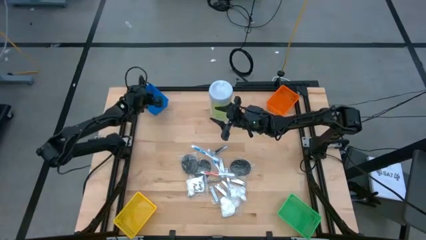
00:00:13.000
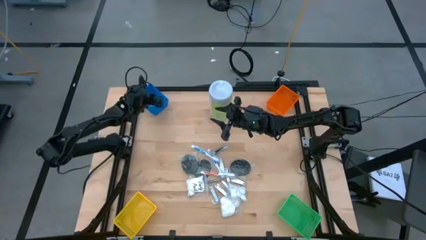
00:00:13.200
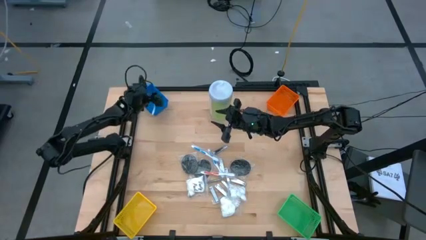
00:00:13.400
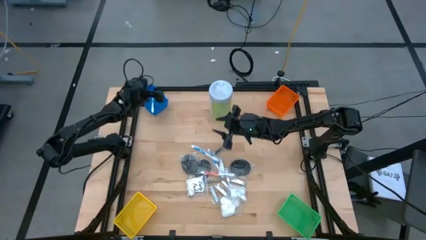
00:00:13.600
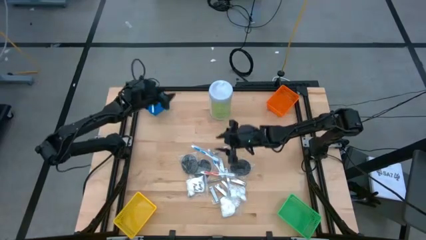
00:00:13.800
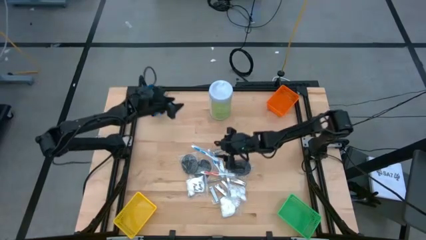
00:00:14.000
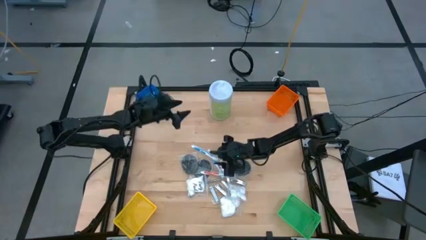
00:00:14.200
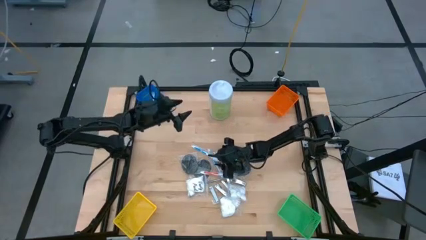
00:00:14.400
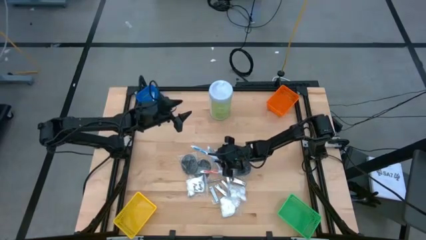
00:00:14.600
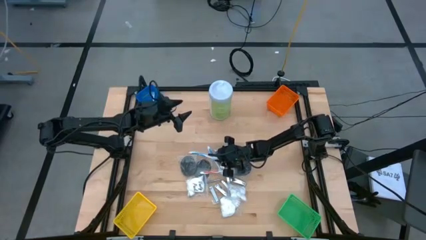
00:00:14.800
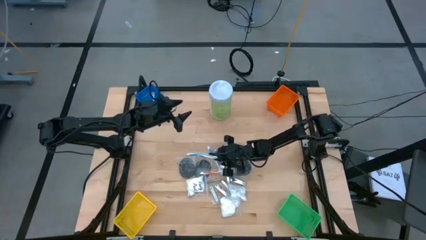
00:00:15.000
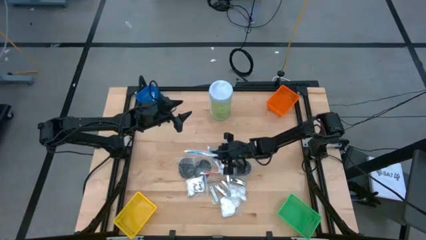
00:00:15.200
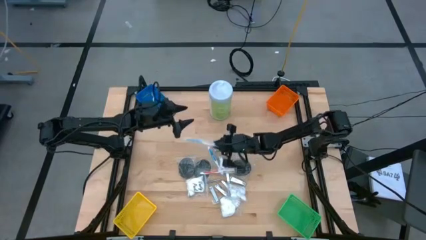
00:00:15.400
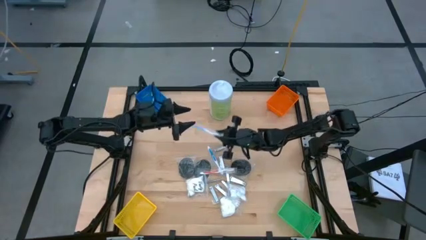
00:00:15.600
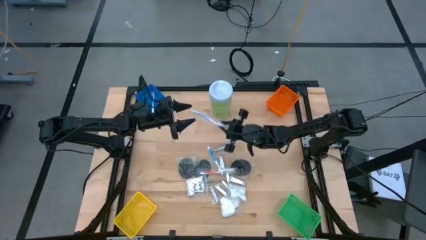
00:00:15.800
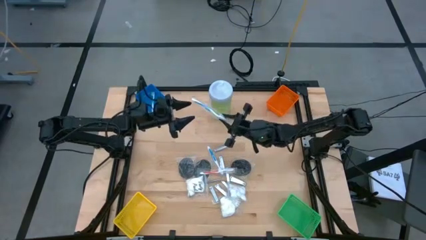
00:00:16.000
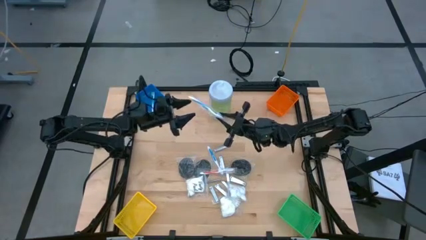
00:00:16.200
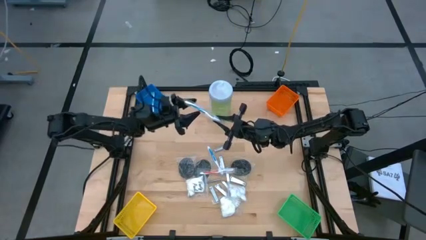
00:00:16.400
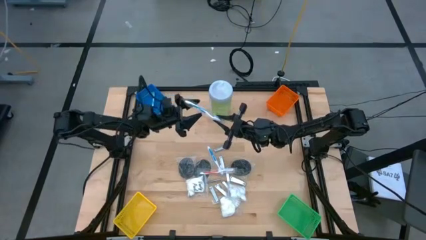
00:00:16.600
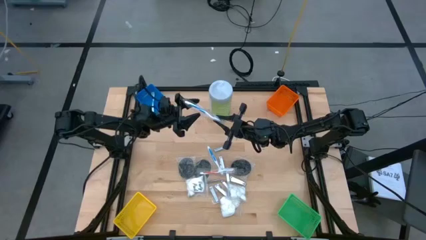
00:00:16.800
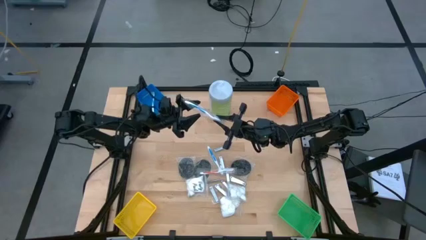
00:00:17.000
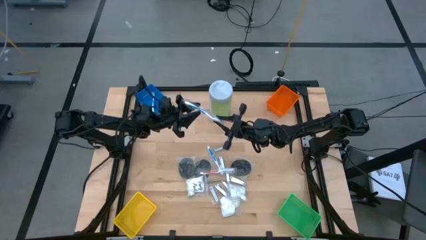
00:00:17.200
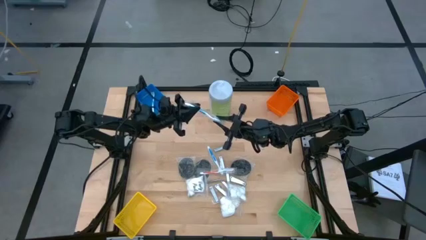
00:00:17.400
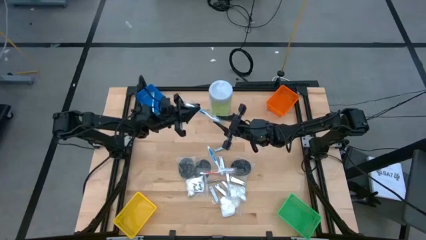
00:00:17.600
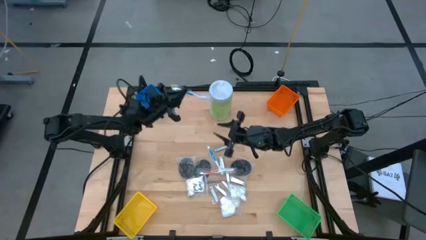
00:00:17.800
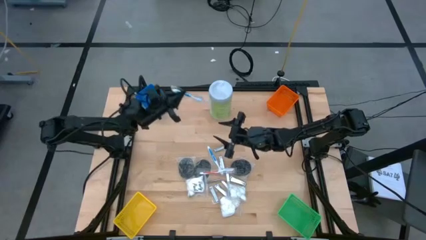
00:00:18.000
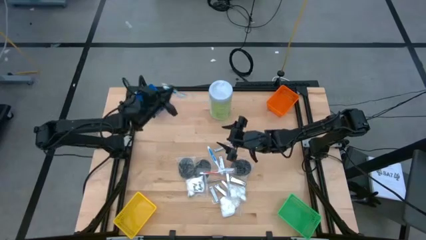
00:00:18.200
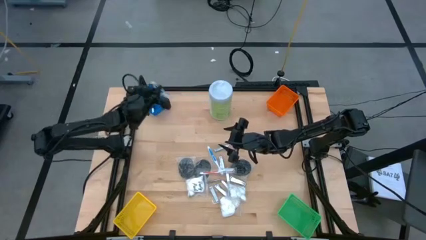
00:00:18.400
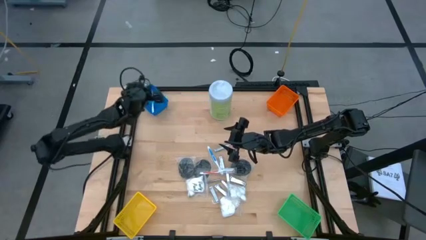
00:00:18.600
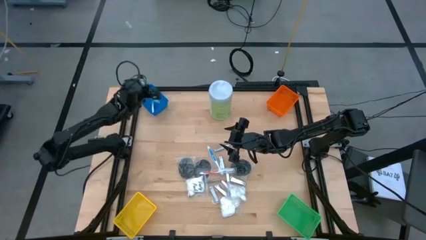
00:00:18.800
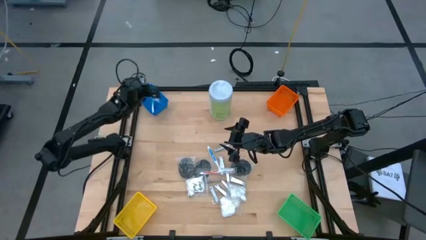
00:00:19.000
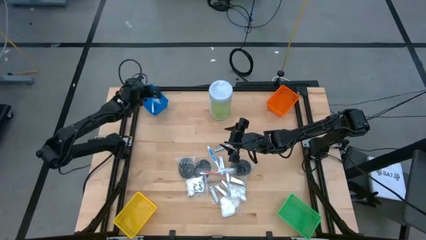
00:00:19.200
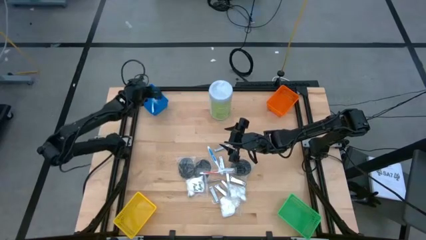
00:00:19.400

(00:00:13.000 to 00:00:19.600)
Task: Pick & Place Travel size toiletries
Put the blue toothbrush into the blue bin

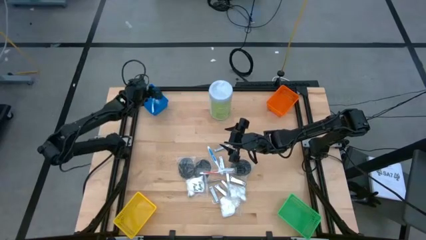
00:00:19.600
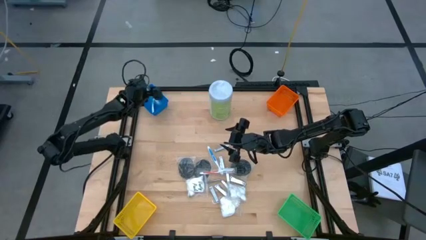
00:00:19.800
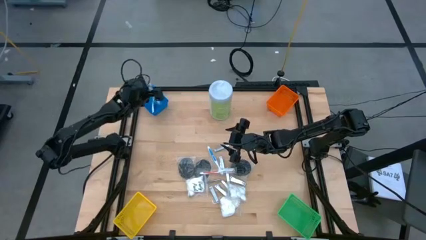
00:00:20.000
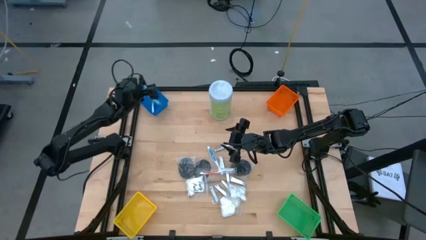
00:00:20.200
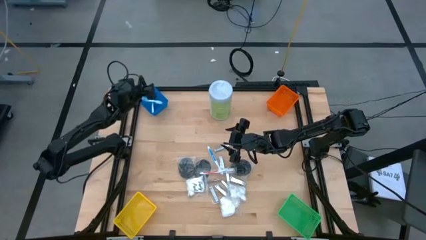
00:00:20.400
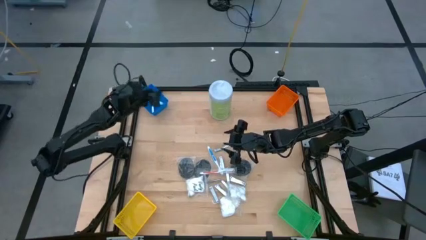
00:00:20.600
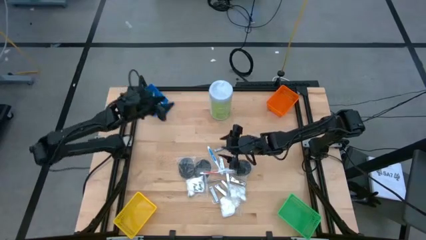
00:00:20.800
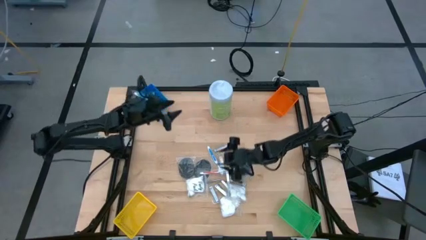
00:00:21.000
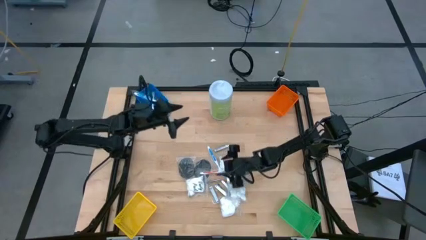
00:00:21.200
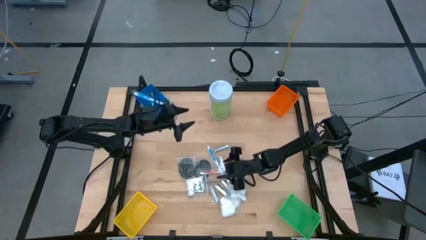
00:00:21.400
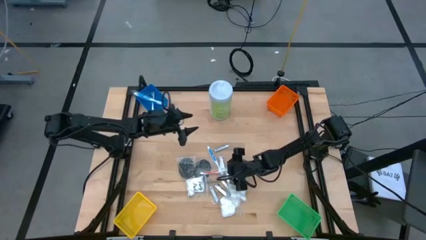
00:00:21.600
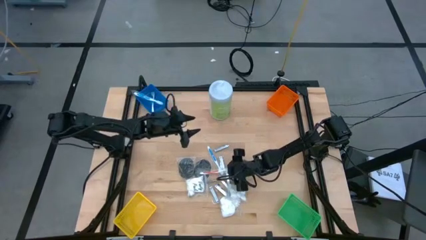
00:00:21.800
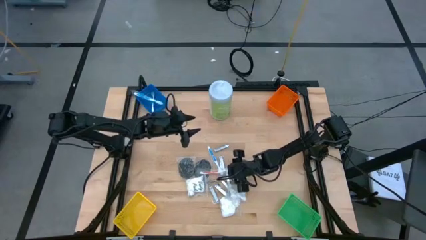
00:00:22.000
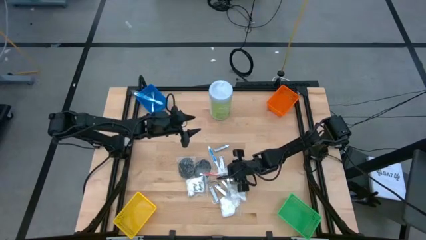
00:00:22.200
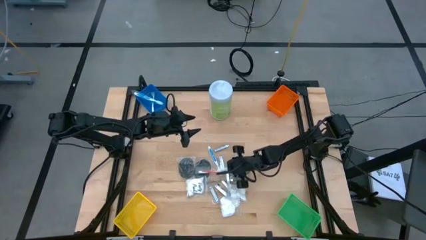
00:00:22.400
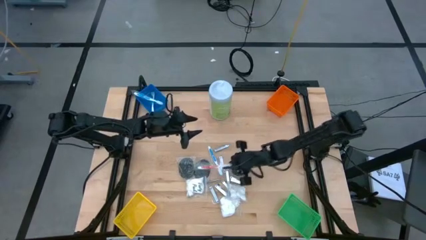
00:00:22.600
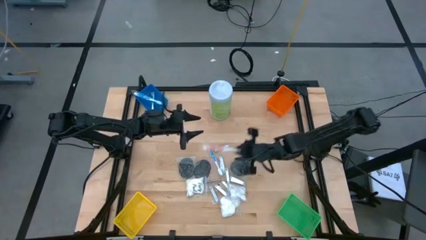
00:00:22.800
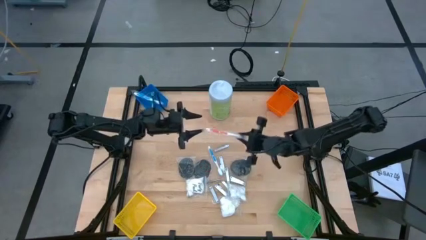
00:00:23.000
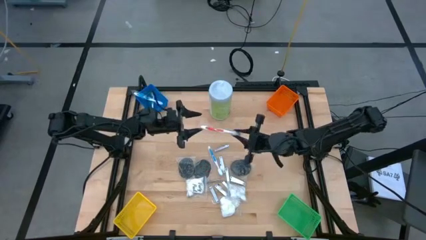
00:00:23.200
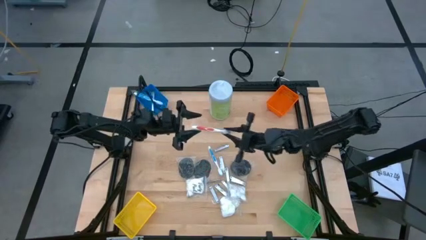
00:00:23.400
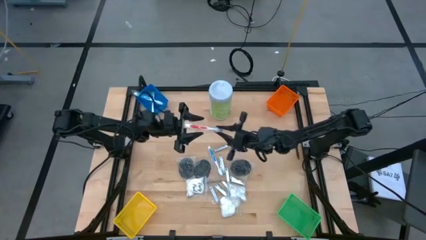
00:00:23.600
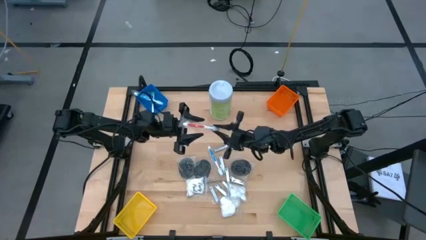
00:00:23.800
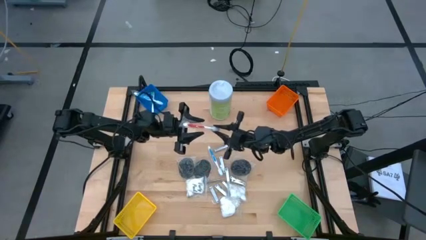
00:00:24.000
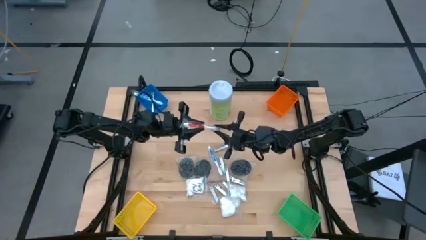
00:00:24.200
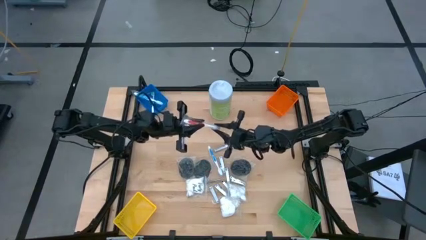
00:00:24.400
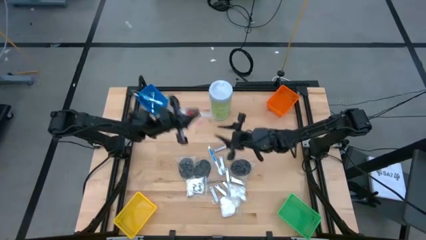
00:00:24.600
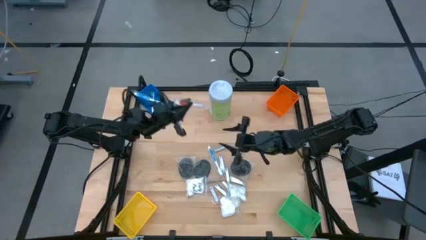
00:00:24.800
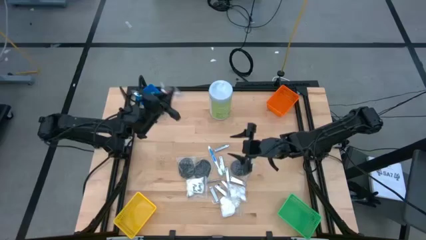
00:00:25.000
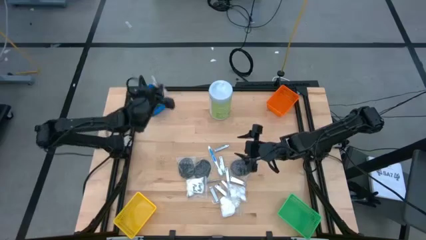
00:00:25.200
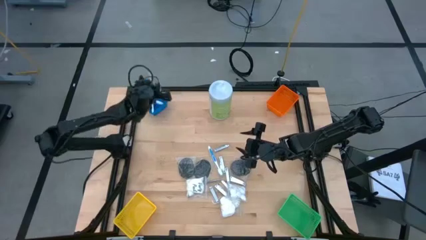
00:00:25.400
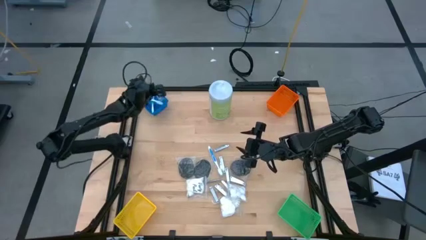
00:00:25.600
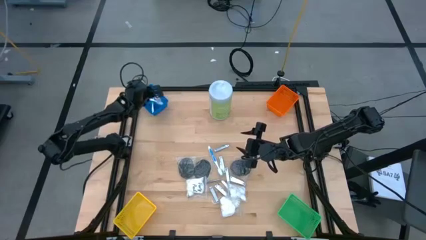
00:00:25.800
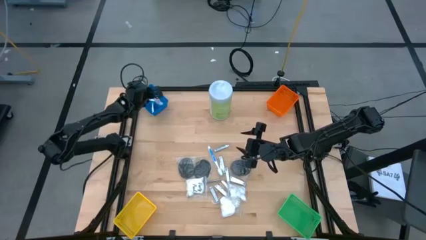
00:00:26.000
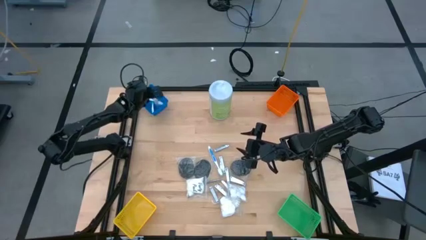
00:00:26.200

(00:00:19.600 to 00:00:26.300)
Put the orange toothbrush into the blue bin

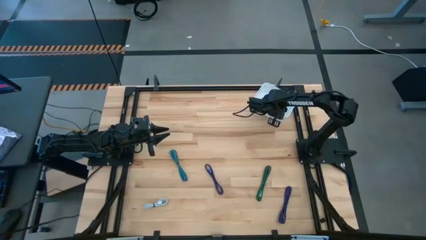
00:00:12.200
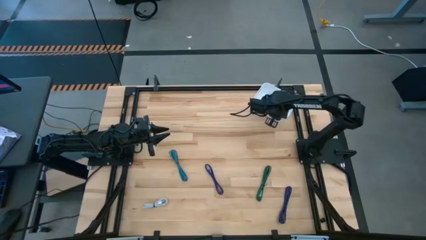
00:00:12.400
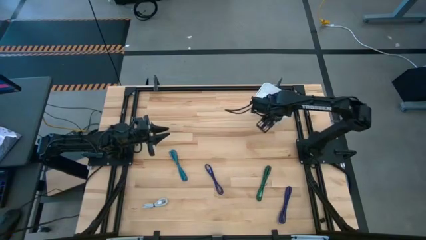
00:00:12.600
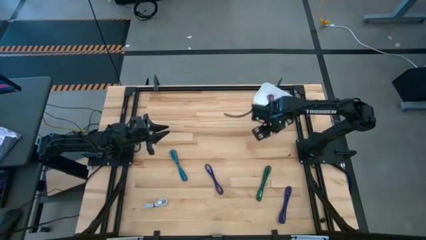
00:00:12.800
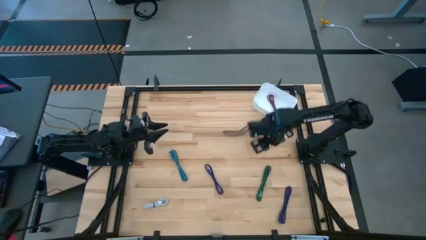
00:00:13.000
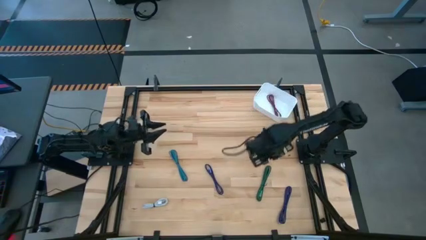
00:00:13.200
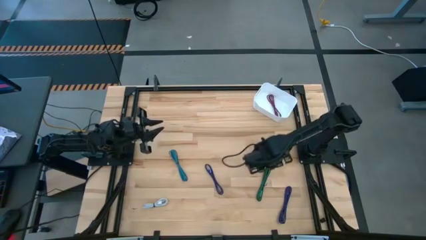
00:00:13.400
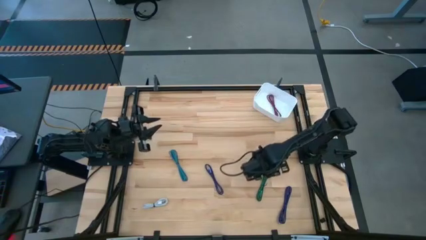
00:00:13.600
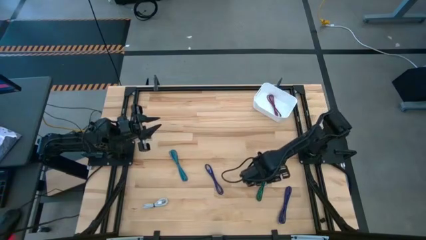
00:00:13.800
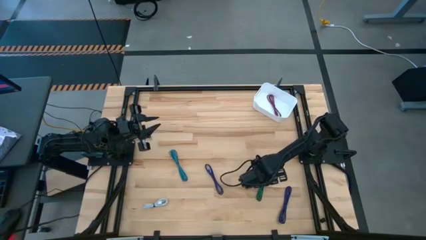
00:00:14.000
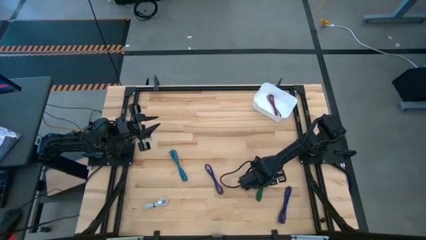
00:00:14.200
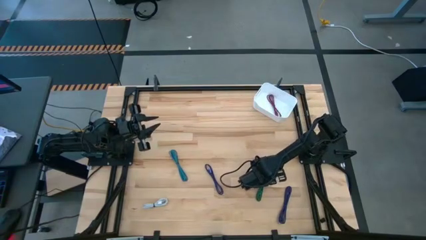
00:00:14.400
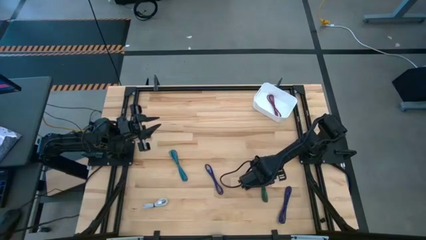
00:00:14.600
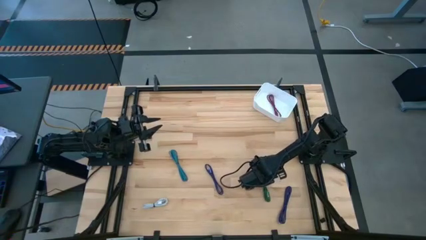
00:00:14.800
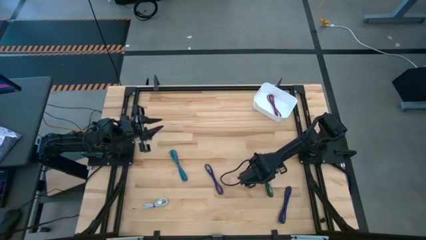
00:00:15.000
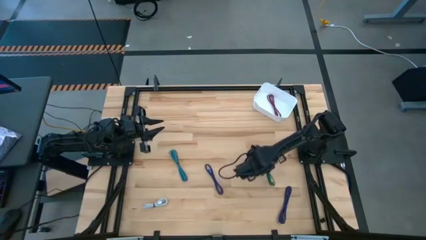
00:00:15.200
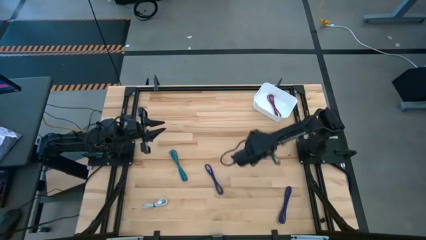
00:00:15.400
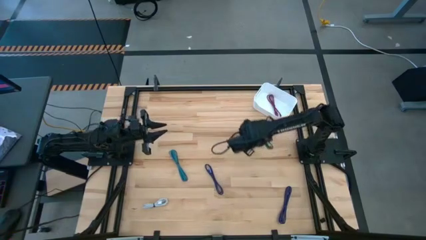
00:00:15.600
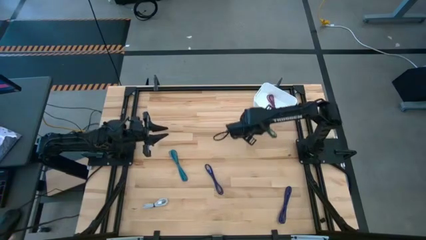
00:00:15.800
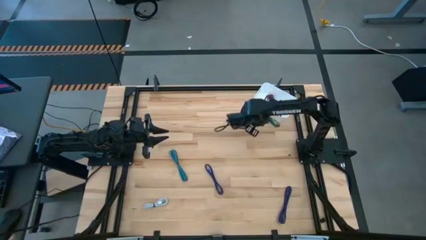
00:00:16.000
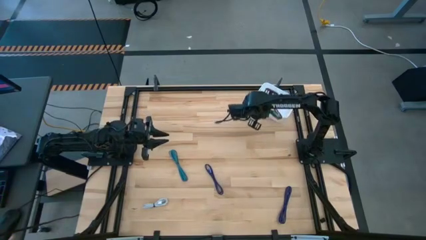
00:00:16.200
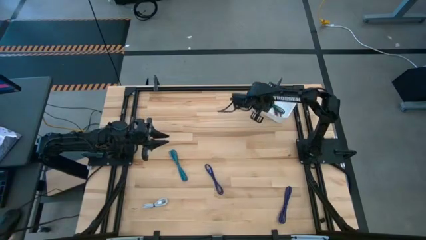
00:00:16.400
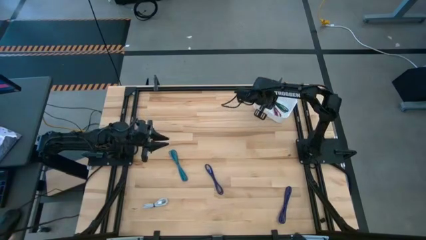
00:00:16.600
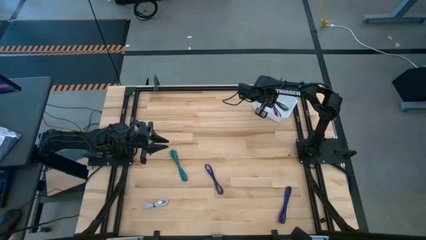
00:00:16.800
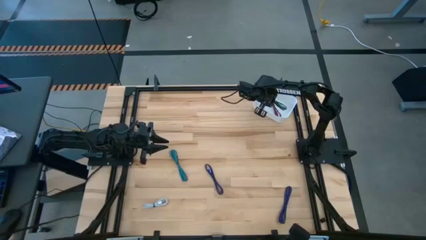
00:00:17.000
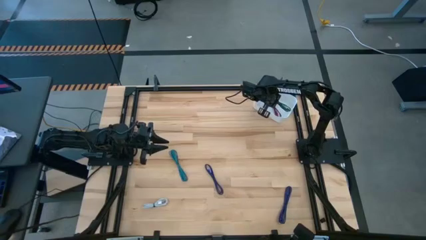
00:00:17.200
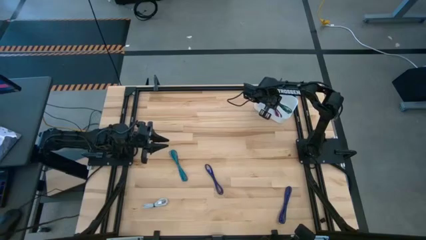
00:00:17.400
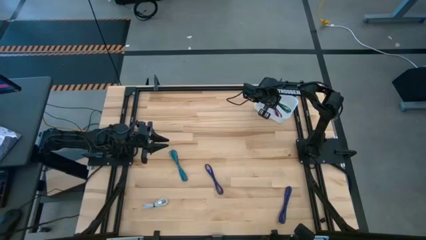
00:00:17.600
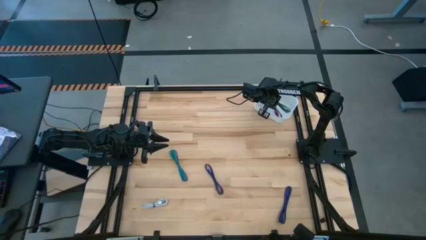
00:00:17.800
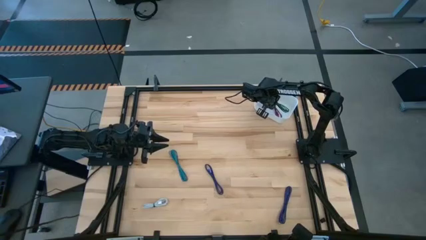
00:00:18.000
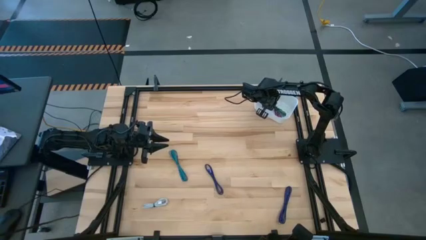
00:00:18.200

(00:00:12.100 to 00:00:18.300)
Task: Pick and place USB-C Cables
Put the green charger cable into the white bin
